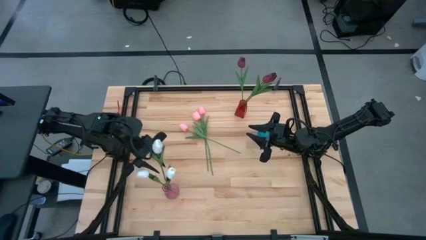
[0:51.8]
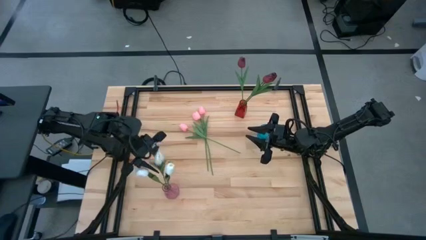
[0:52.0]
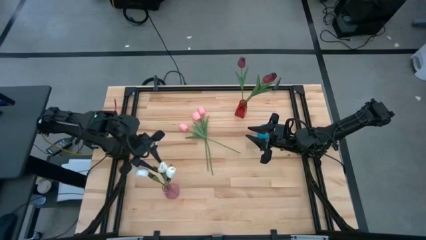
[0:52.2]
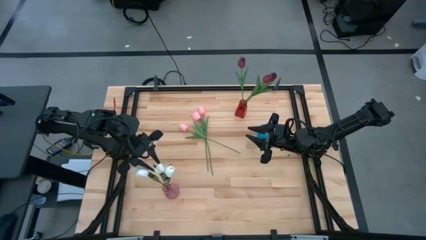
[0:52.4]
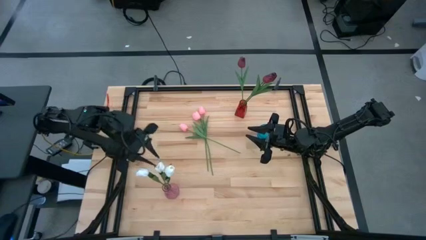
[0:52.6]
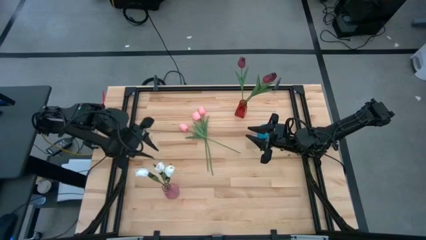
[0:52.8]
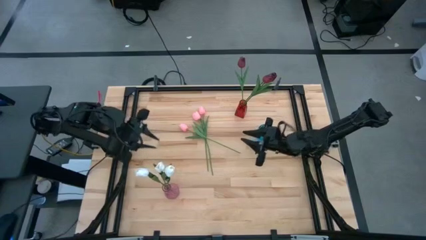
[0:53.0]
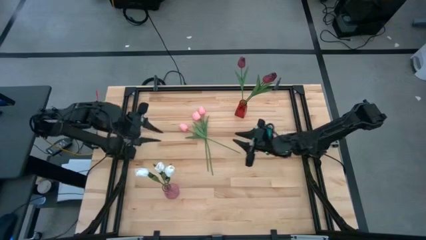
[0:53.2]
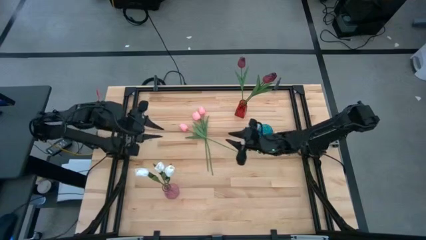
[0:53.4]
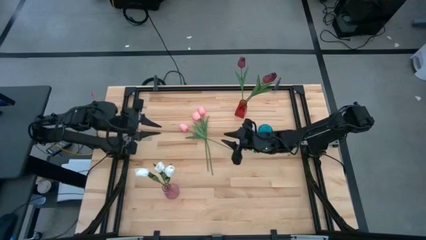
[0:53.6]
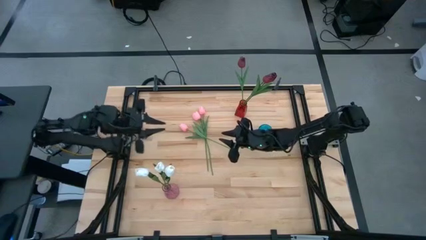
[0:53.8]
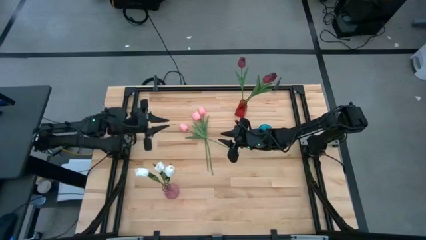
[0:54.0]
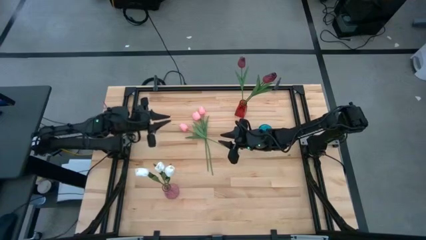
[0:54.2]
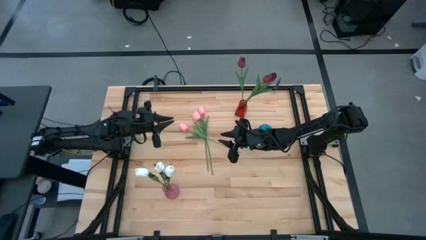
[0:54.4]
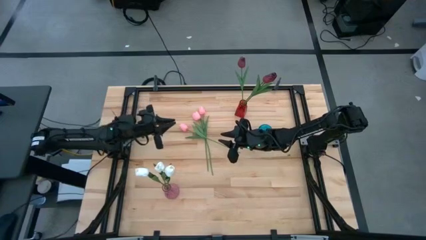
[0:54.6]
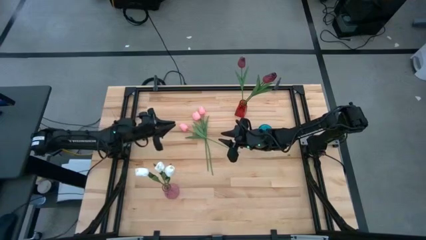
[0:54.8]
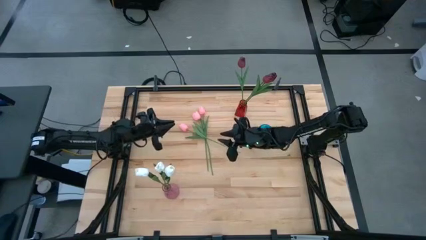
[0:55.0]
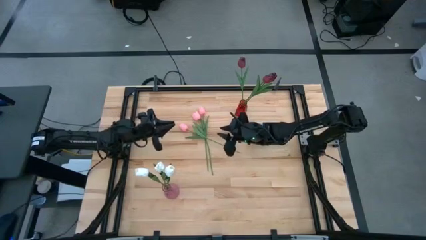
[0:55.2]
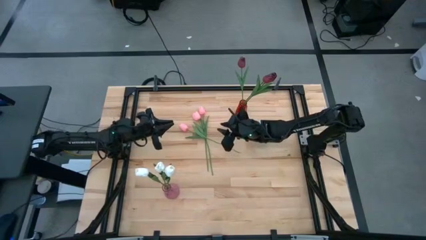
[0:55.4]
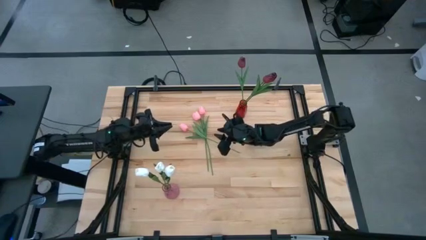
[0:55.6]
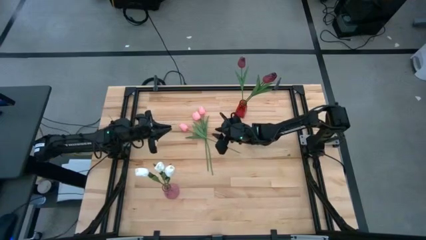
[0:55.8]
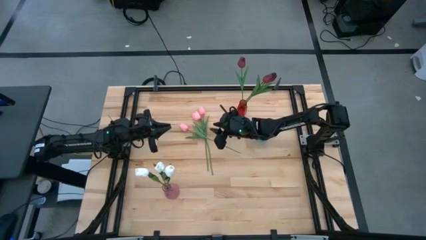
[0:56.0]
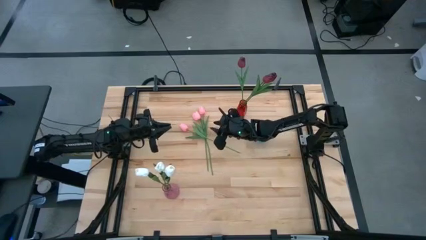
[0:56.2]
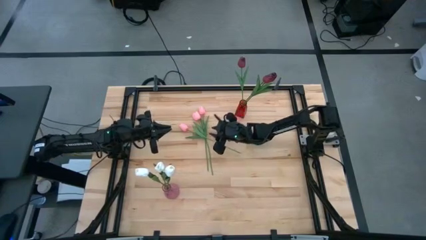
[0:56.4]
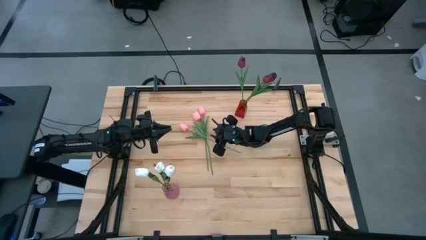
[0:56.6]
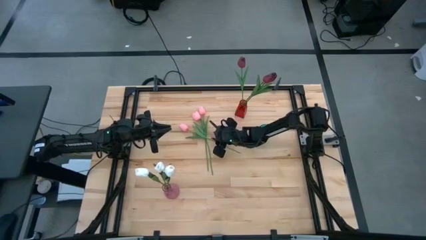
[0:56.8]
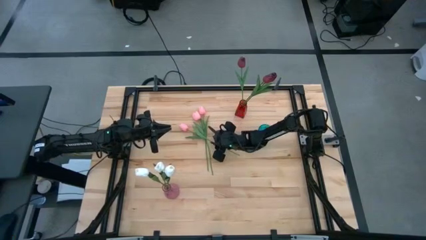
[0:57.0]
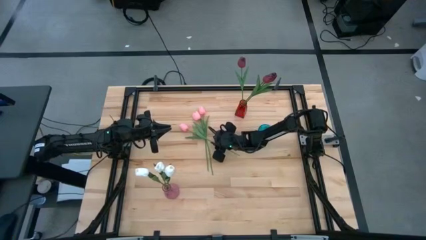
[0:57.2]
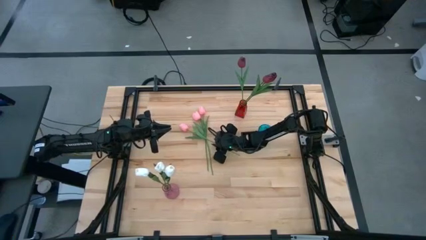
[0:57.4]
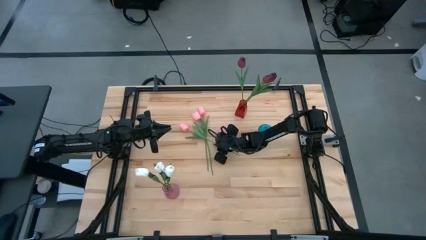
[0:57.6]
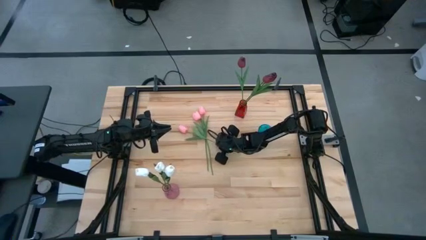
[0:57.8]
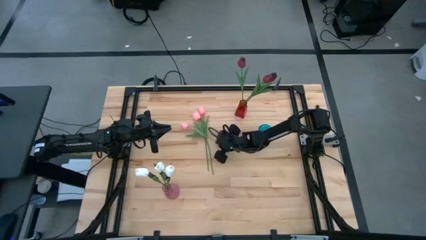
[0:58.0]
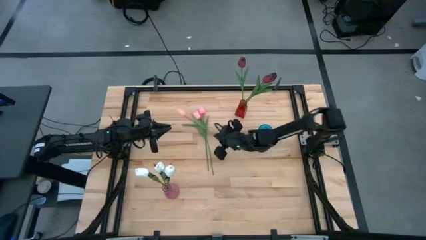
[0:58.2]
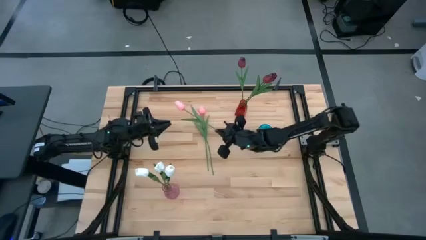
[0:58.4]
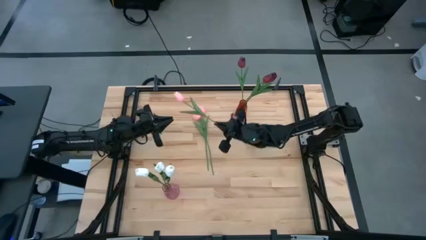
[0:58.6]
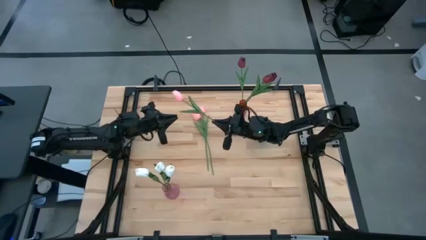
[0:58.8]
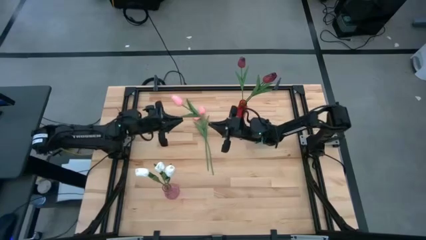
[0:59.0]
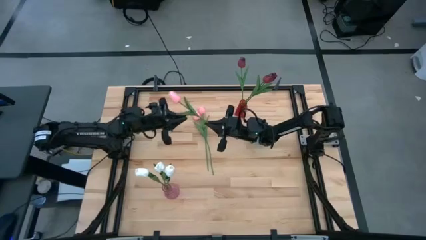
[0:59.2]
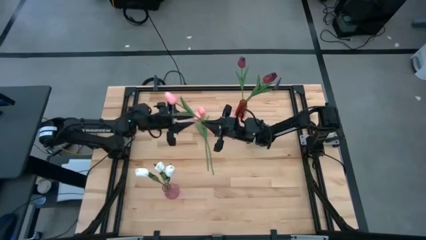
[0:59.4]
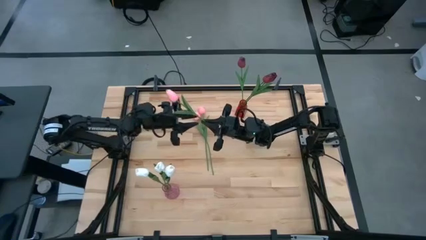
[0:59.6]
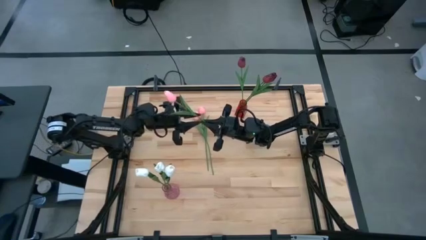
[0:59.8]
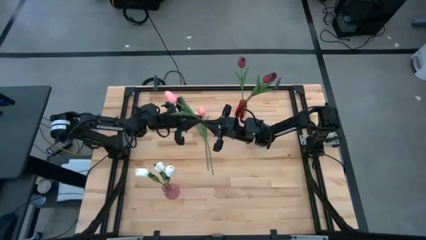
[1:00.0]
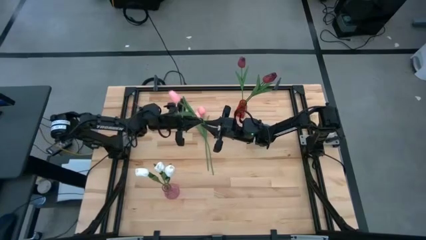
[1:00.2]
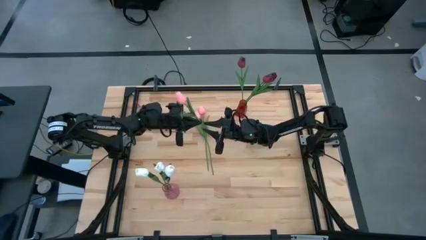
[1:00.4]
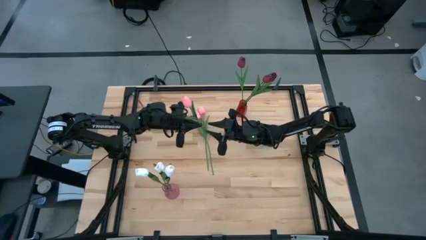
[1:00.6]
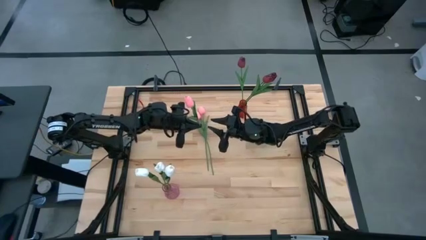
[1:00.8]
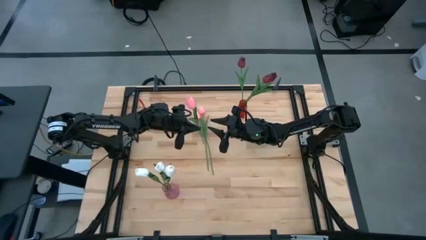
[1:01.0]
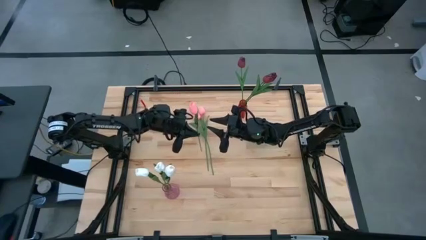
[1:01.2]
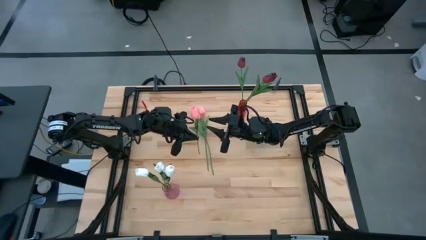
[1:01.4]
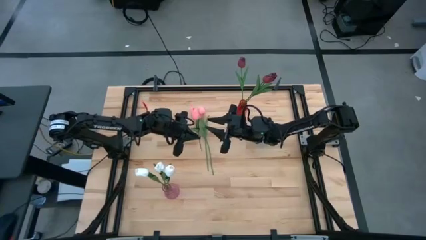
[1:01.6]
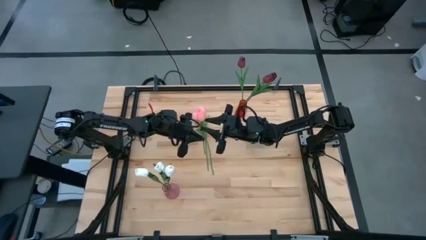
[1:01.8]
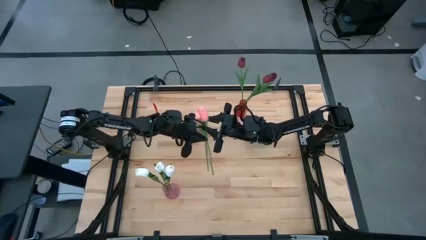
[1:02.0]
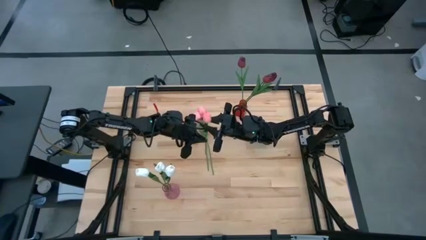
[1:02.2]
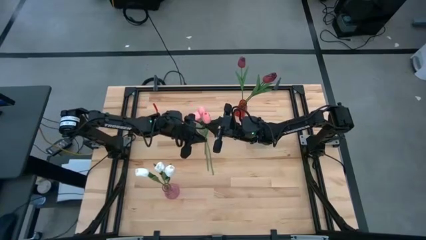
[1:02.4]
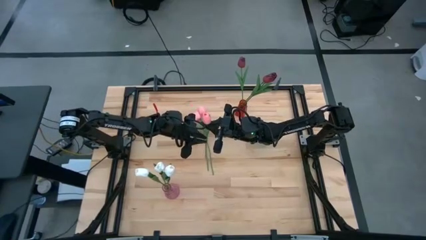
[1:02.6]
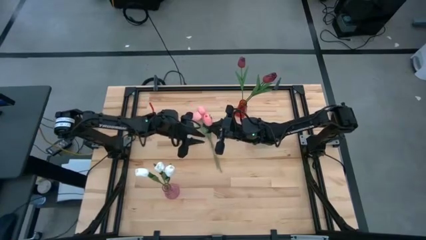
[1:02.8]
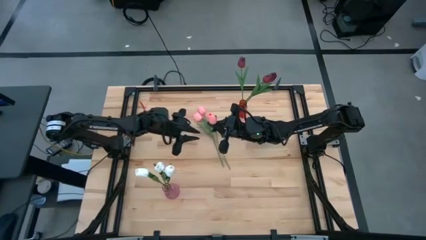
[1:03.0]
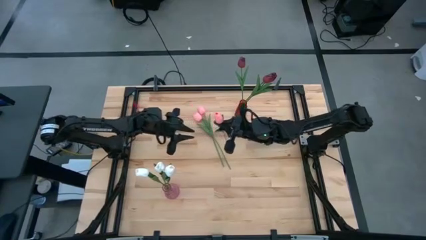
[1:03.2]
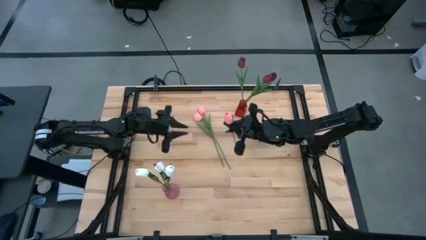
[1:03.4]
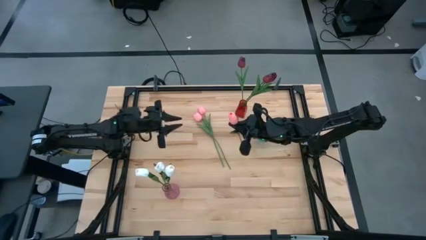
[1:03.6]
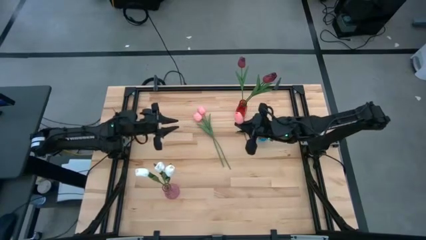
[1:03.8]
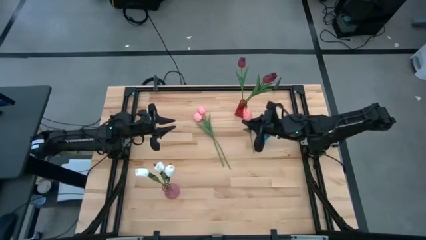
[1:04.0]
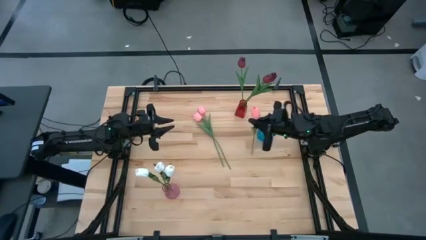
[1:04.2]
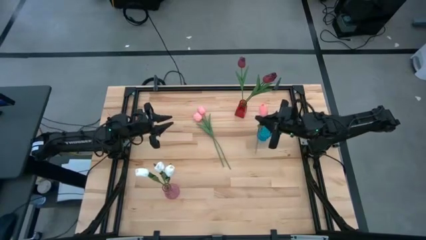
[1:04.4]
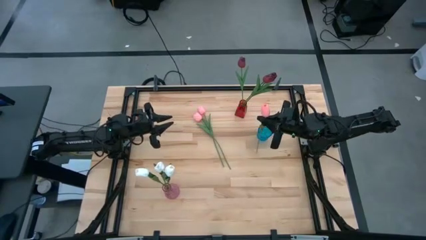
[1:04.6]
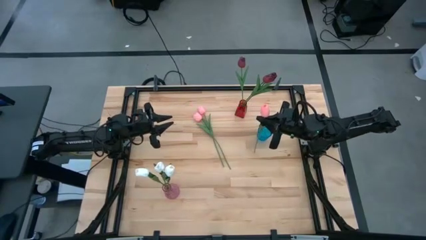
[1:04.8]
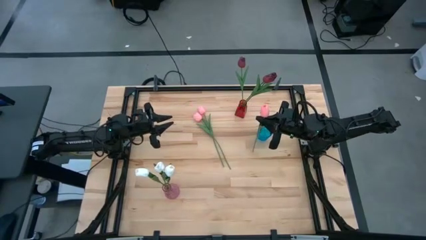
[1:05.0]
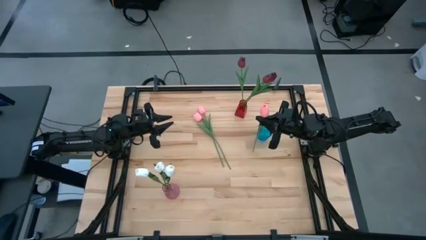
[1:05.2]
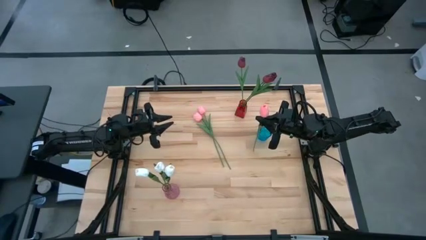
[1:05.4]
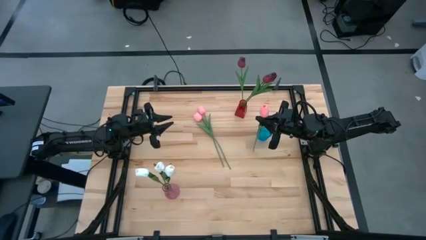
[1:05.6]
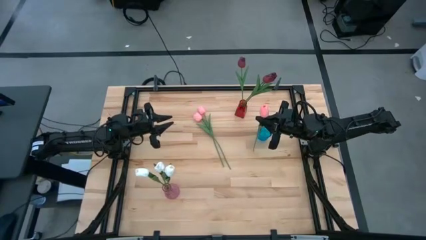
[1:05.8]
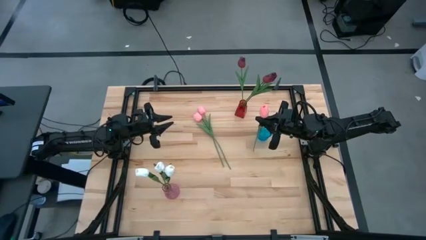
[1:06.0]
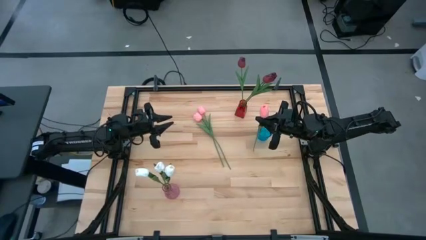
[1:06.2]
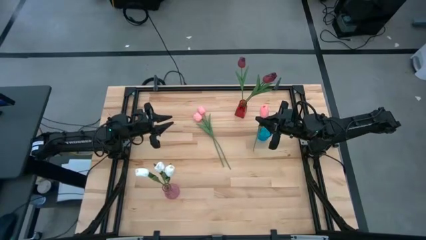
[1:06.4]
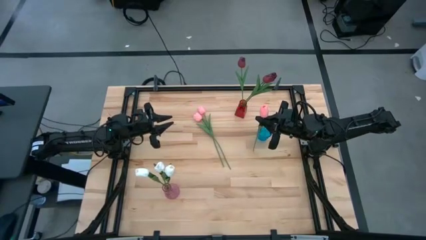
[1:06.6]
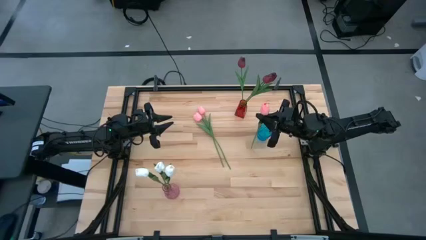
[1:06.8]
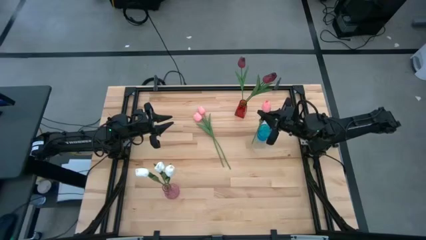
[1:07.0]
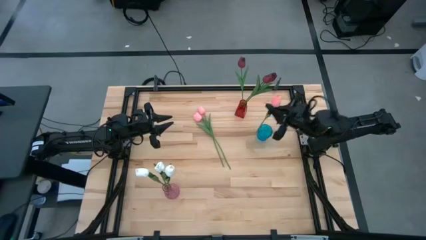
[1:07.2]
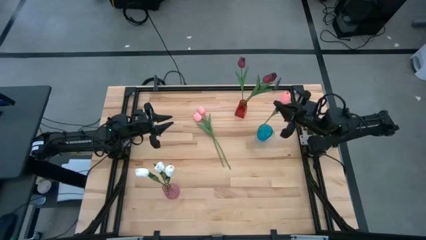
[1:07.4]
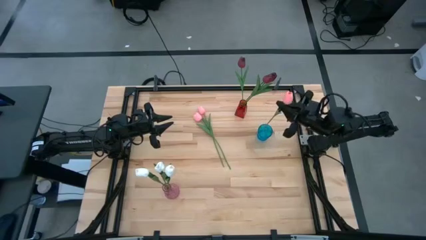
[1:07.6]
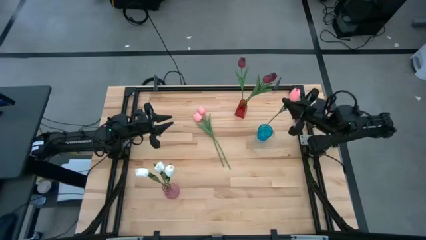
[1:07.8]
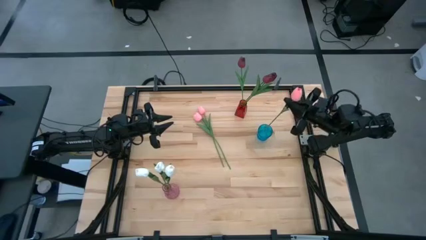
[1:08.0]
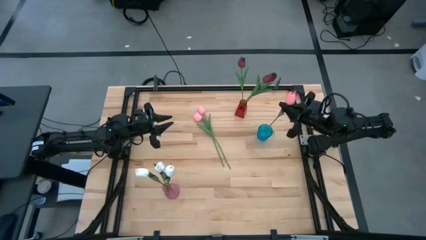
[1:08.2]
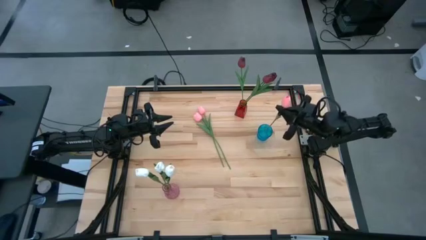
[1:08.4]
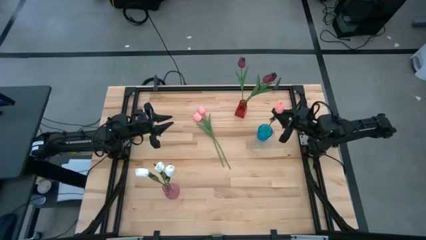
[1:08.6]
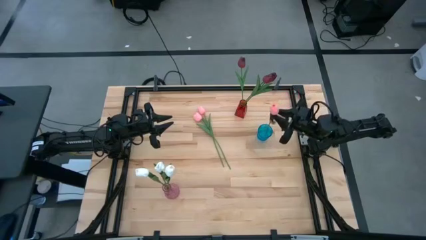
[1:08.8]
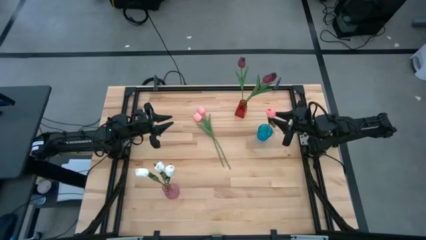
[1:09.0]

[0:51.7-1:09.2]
Task: Sort flowers into vase by color
Put the bottom pink tulip into the blue vase
